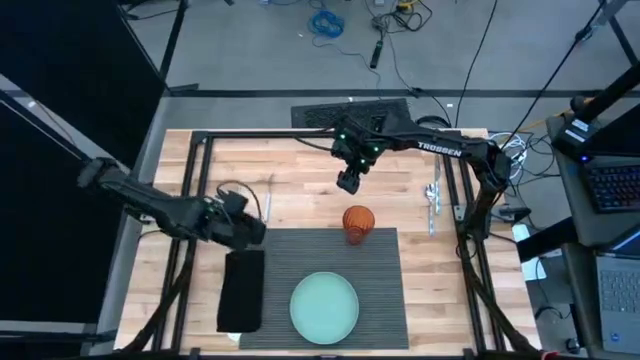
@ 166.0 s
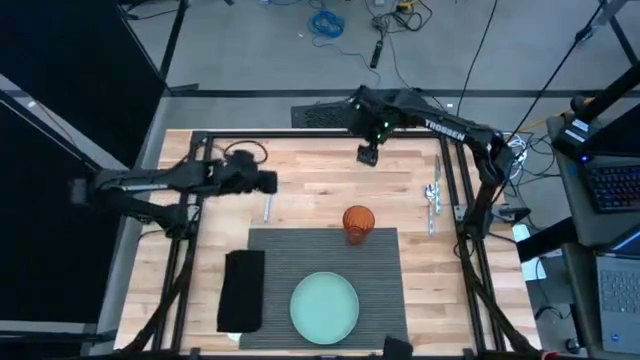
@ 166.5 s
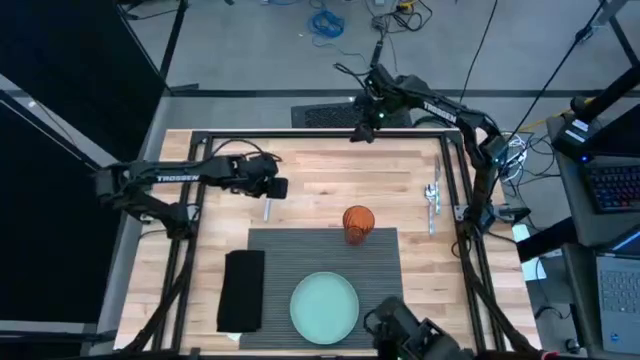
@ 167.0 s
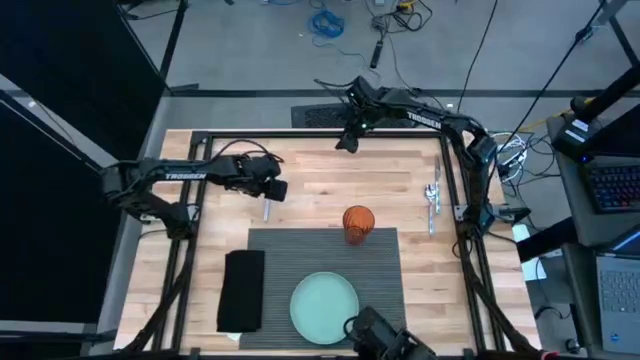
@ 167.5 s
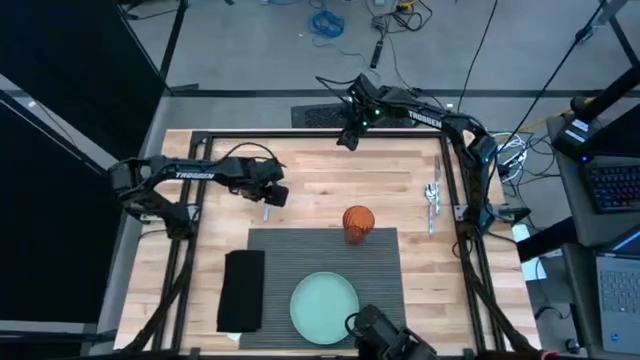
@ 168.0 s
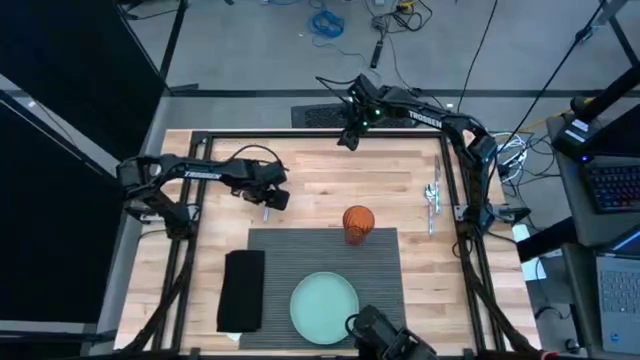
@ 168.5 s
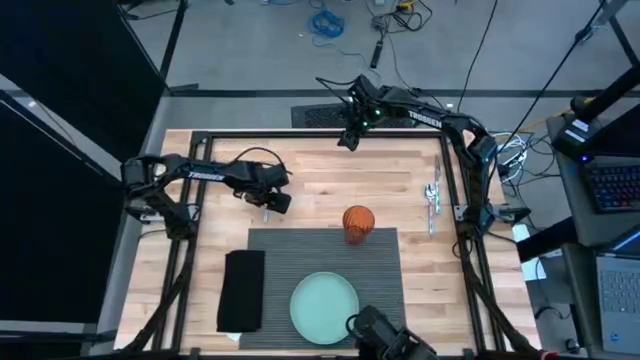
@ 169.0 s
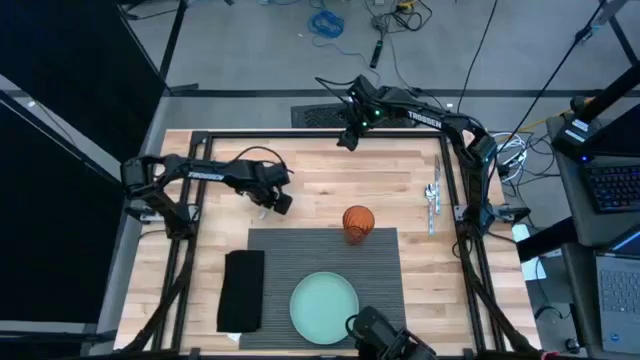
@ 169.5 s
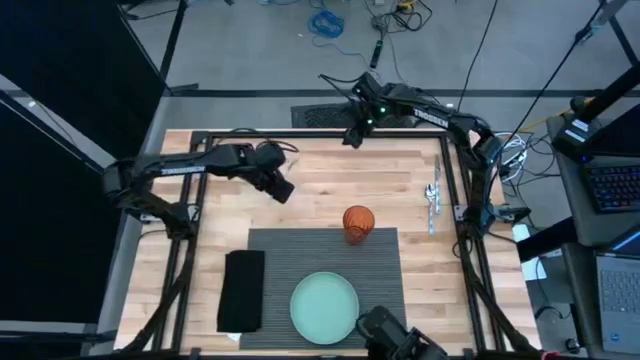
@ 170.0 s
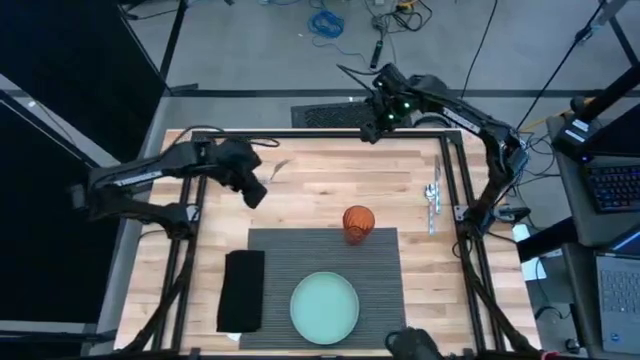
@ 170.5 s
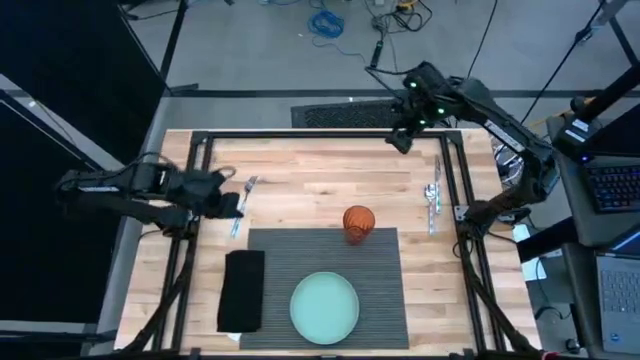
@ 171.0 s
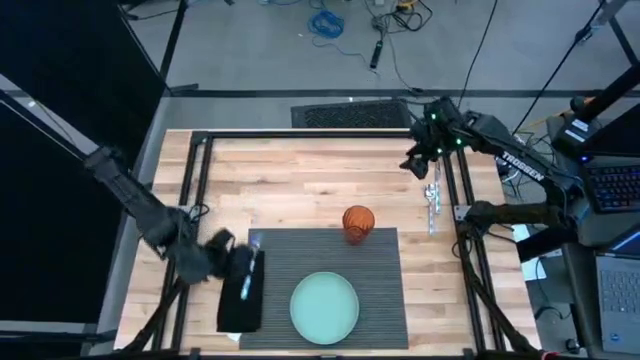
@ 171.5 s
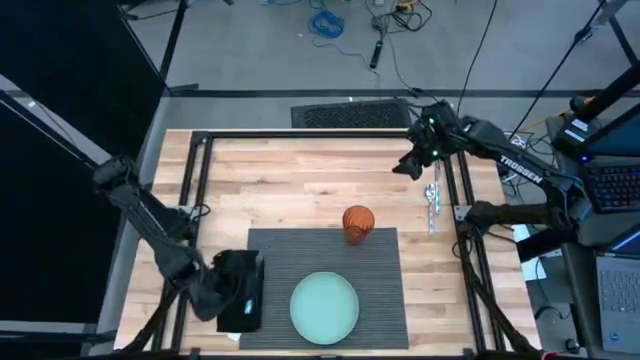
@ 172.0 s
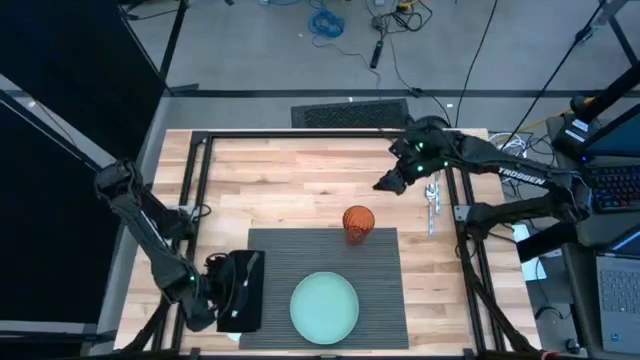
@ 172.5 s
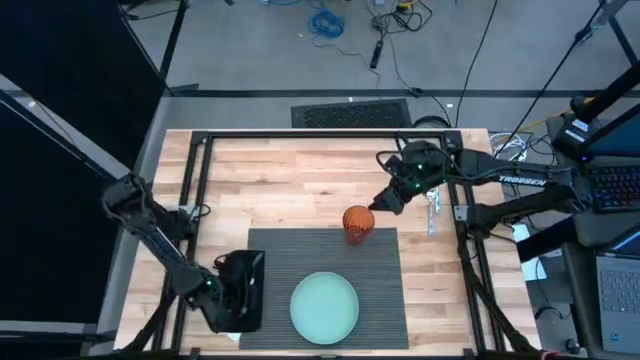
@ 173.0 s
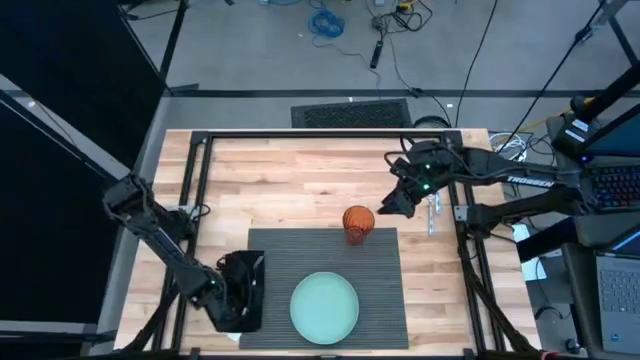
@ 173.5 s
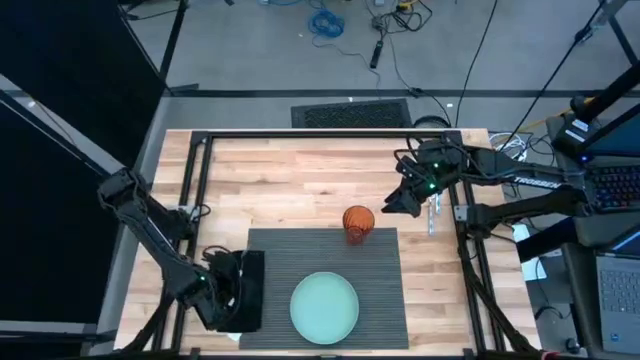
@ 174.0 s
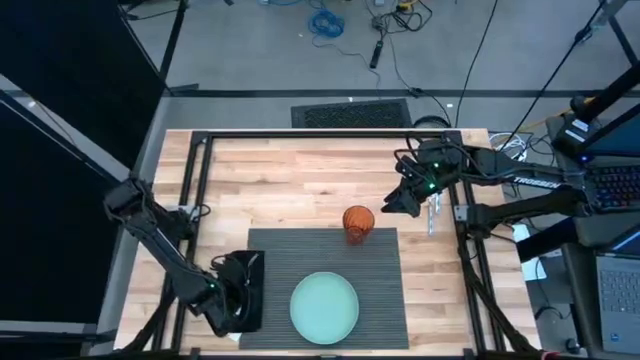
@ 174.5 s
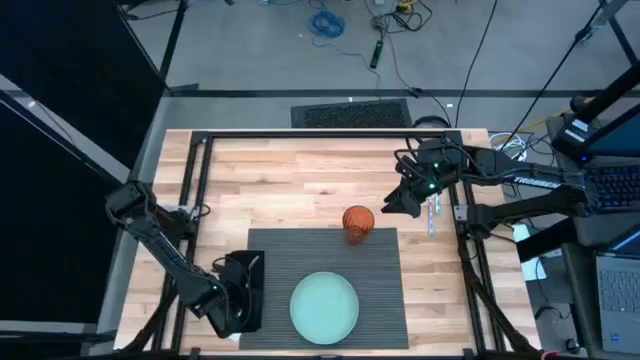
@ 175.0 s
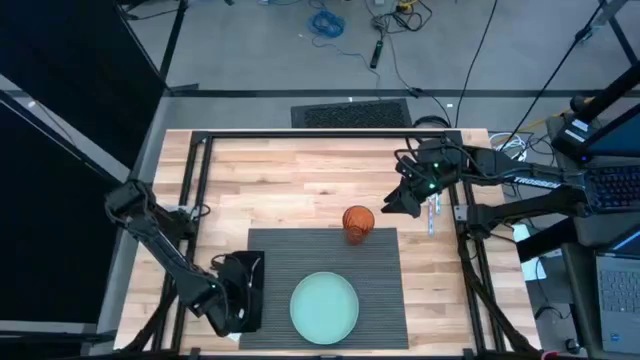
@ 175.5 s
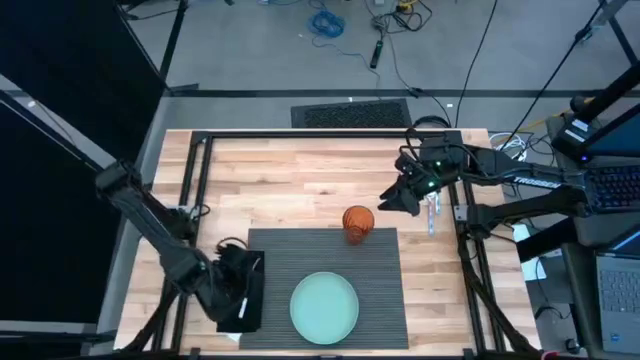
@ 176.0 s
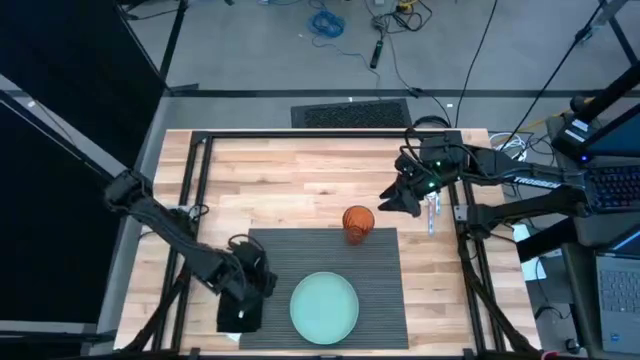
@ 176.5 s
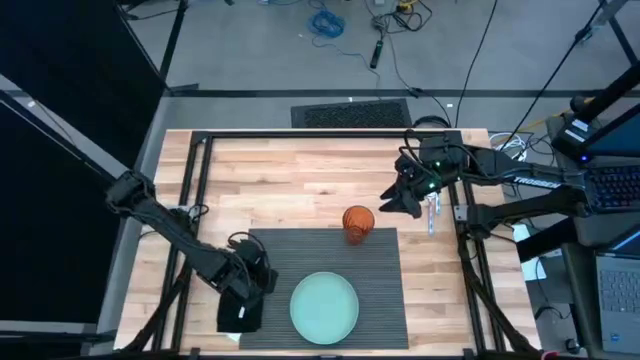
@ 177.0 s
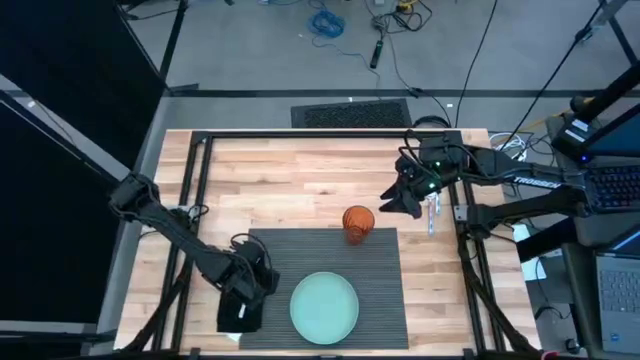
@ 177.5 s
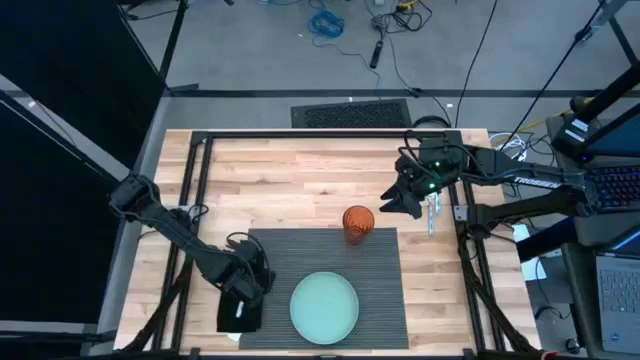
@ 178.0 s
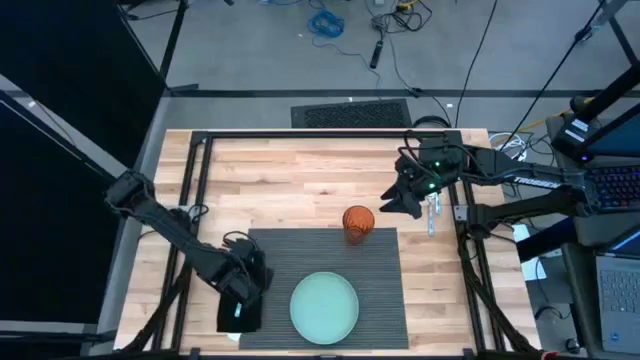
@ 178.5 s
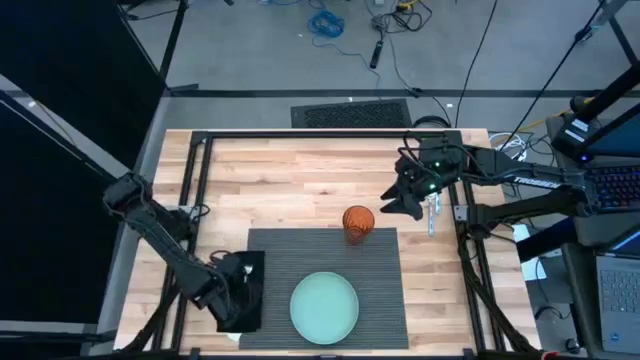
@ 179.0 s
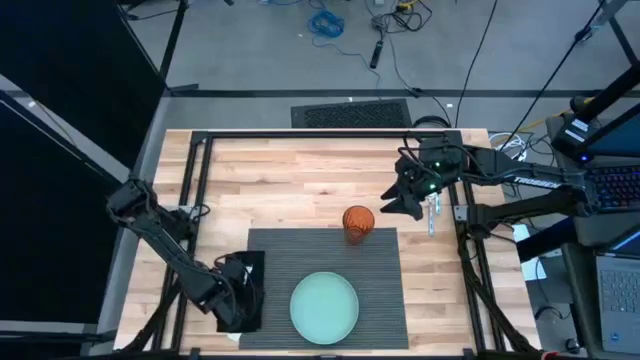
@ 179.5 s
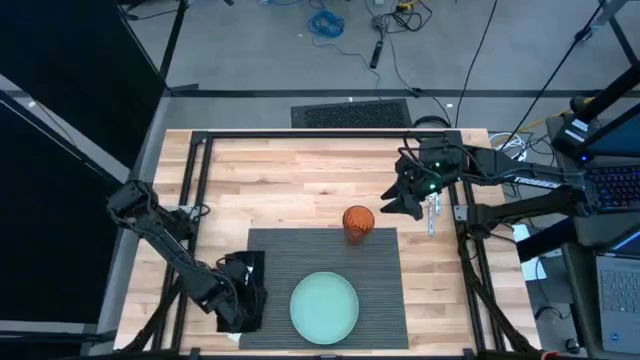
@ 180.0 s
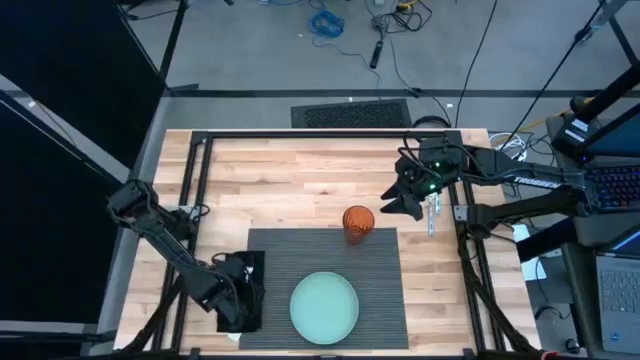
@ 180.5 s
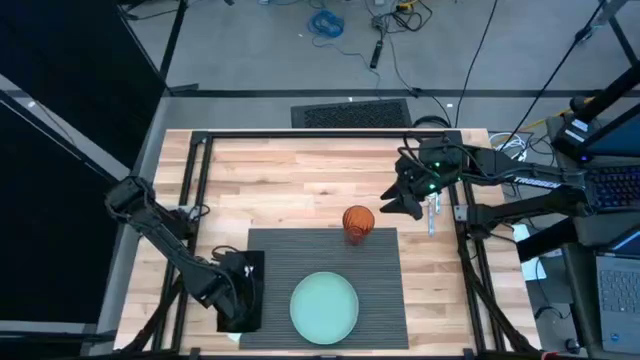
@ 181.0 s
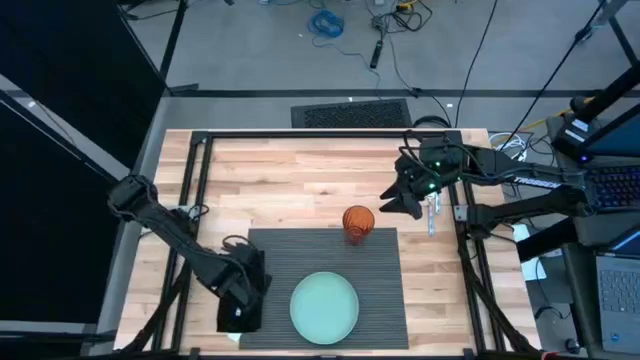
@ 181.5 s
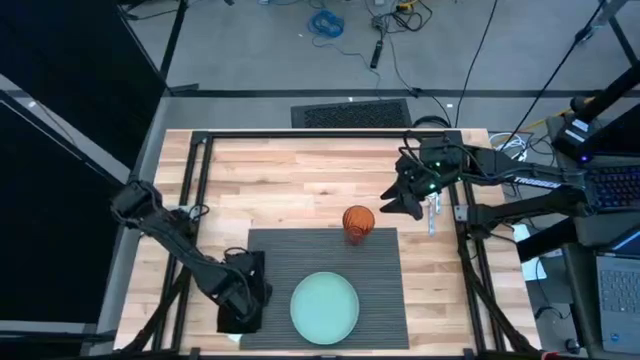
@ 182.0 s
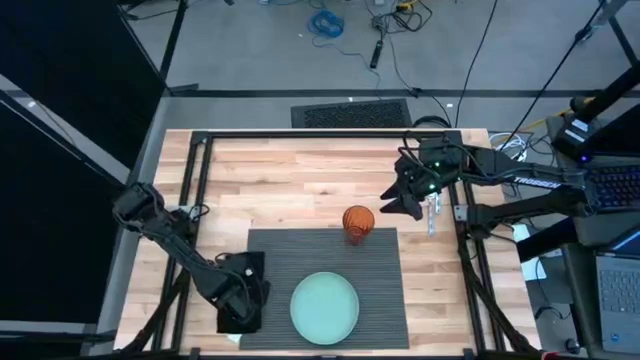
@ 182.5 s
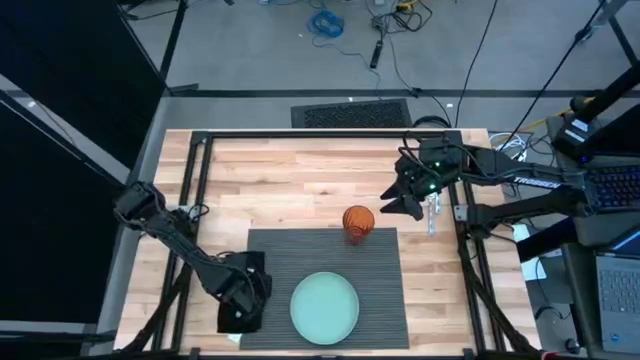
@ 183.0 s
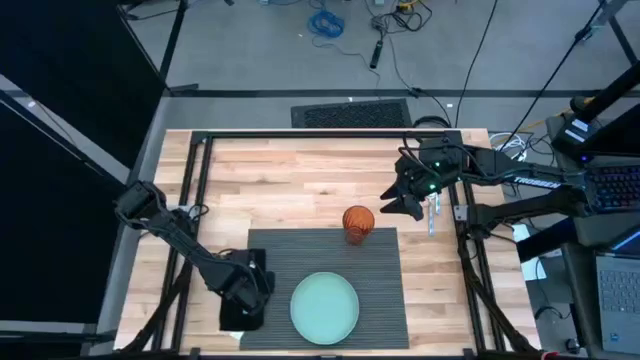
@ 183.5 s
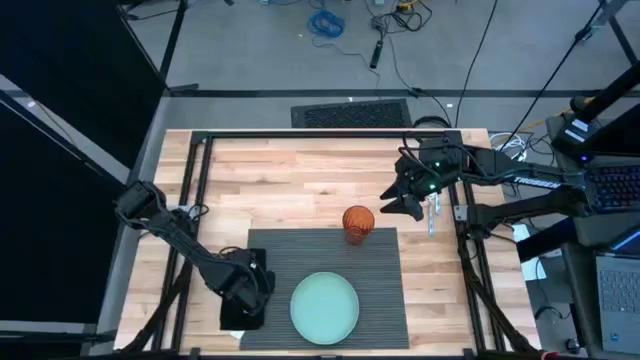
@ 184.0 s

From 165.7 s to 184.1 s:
Task: Set table place
Put the blue fork on top of the black napkin

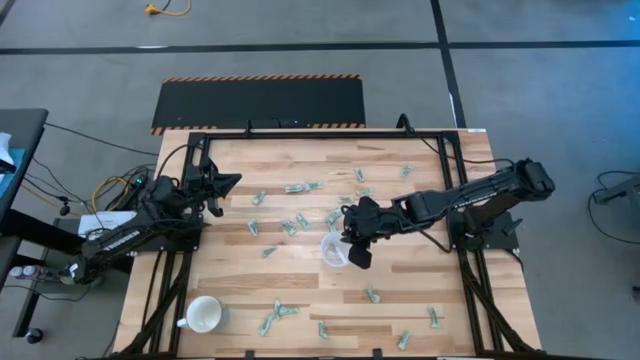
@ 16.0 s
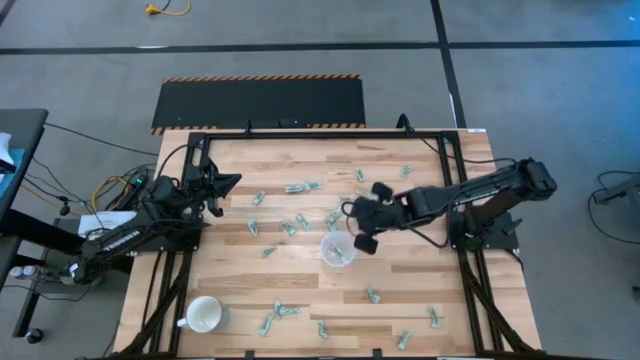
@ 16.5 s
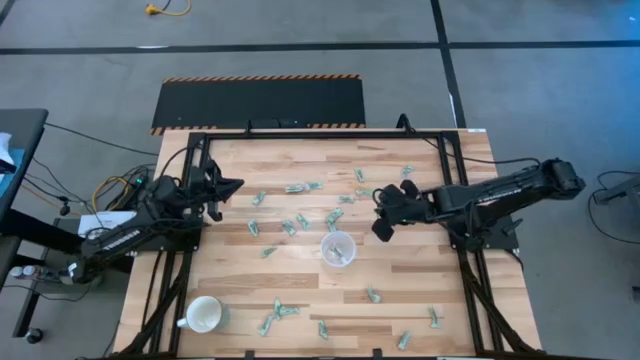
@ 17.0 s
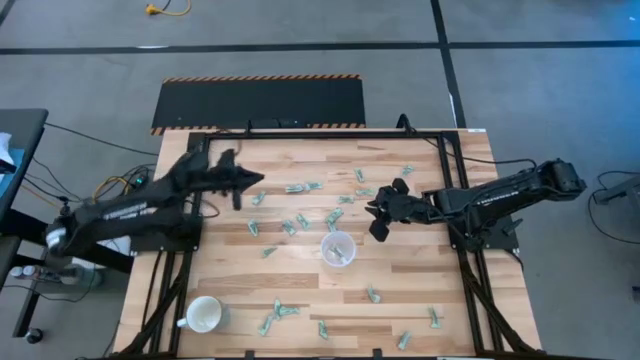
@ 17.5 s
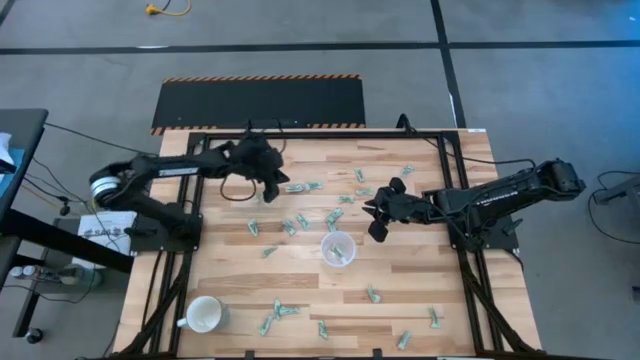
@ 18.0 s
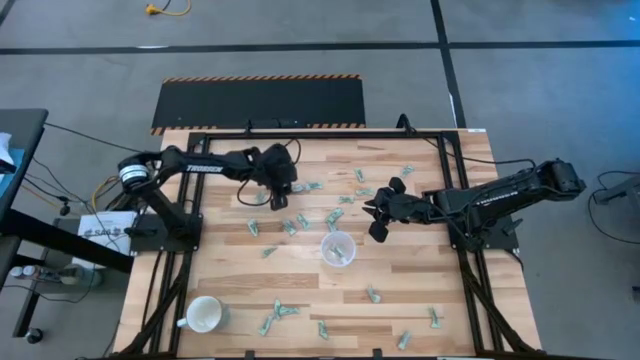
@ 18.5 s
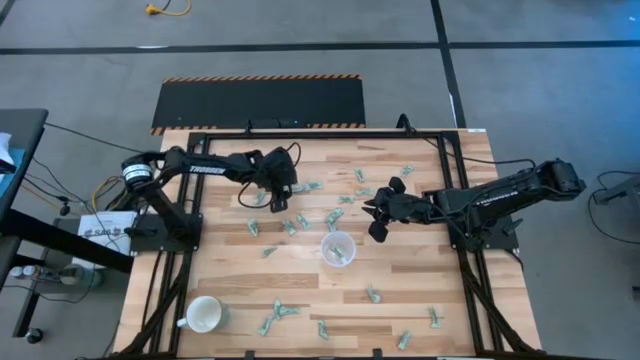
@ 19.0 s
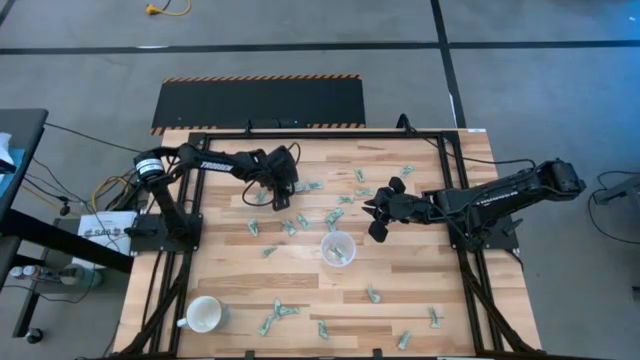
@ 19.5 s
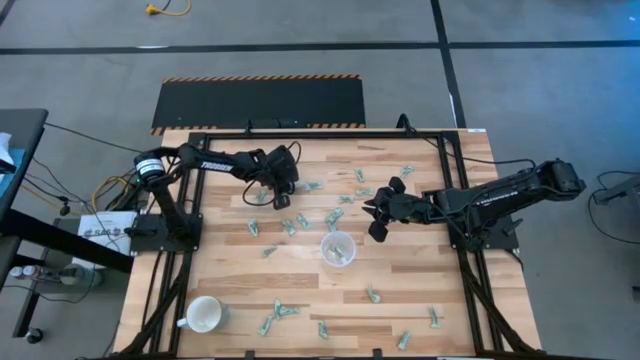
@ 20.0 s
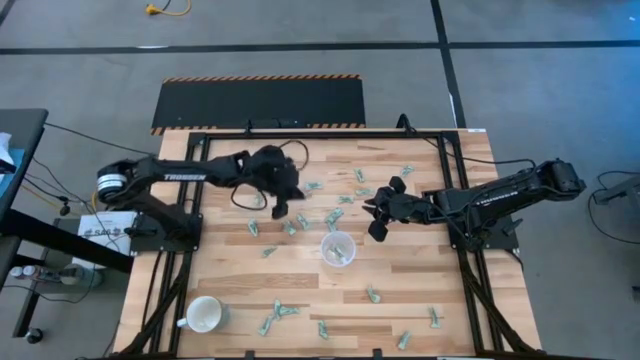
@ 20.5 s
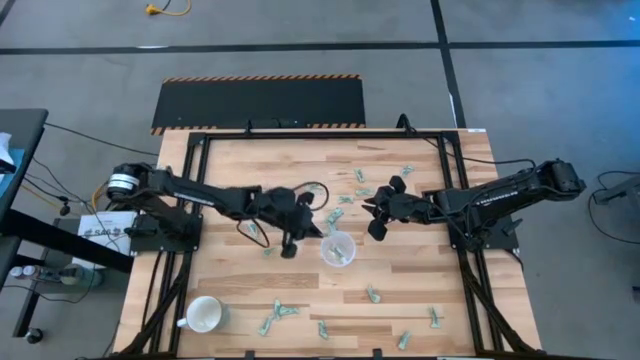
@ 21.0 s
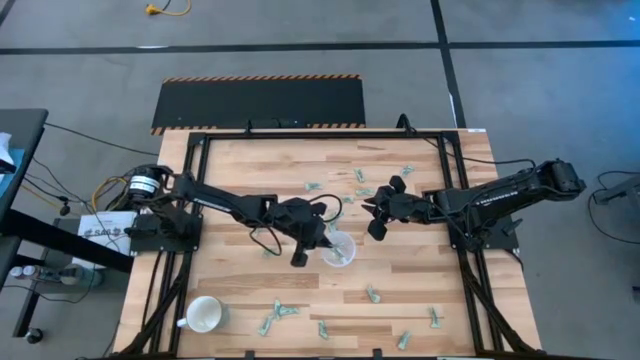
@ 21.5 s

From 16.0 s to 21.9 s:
Task: Pick and place Stevia / Truvia into bins
Put the stevia packet into the transparent container
